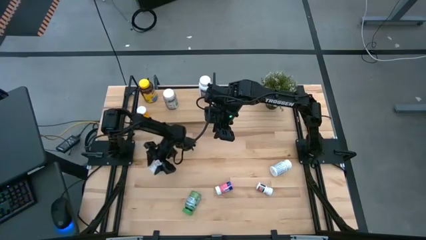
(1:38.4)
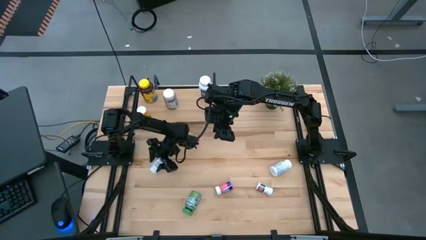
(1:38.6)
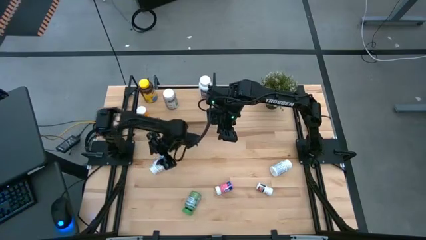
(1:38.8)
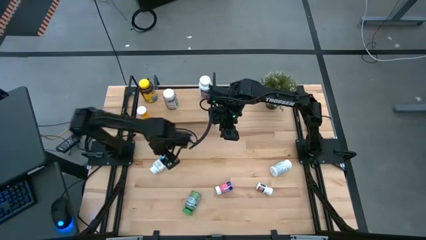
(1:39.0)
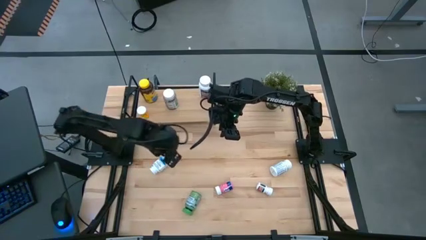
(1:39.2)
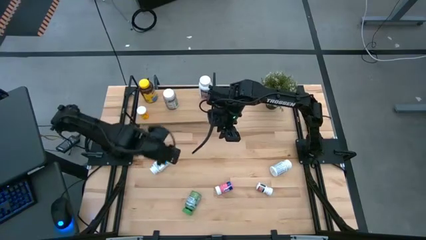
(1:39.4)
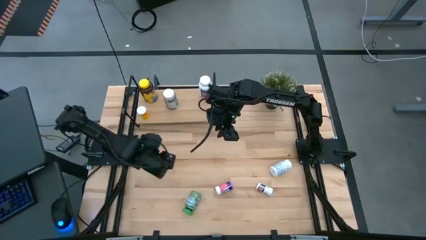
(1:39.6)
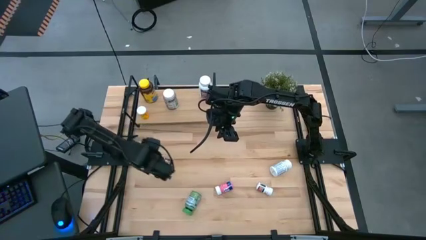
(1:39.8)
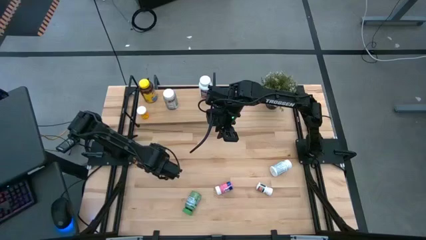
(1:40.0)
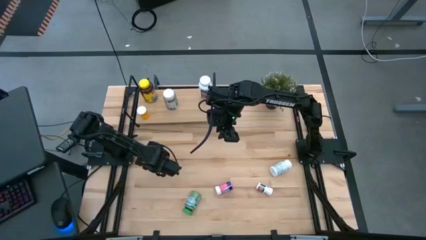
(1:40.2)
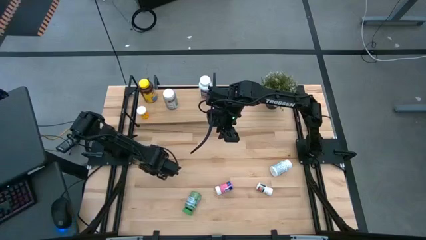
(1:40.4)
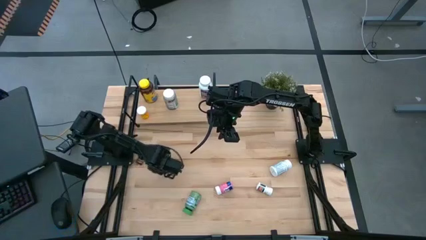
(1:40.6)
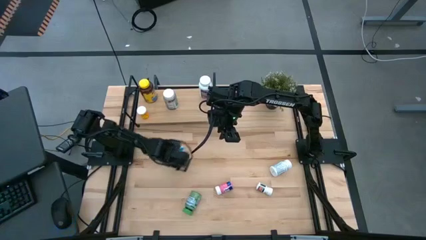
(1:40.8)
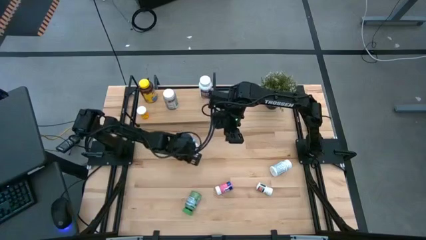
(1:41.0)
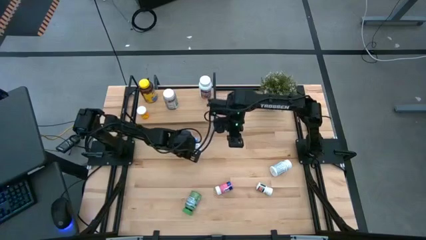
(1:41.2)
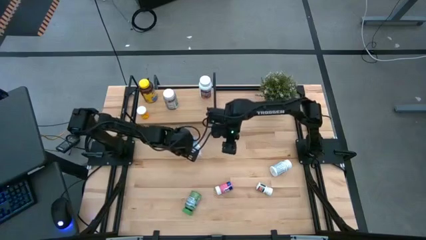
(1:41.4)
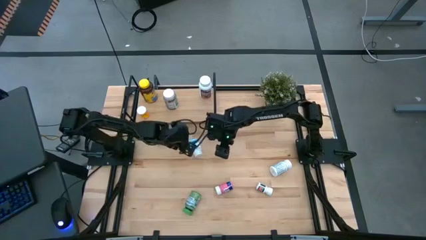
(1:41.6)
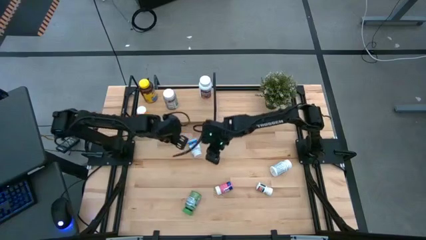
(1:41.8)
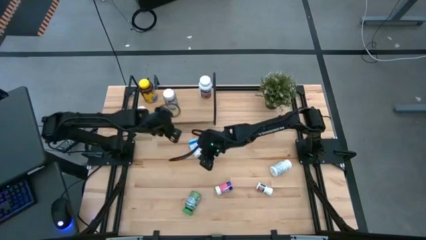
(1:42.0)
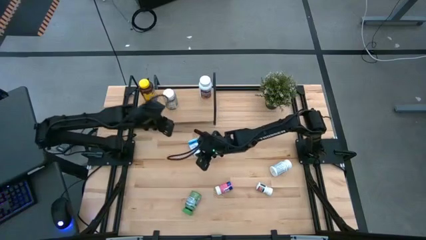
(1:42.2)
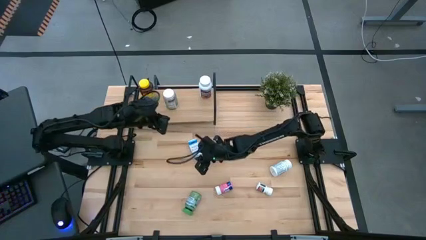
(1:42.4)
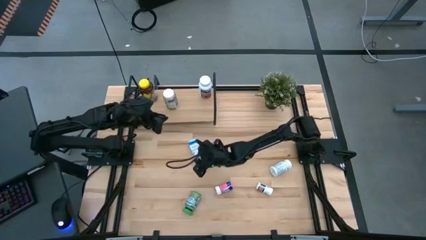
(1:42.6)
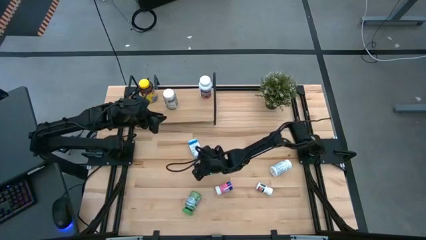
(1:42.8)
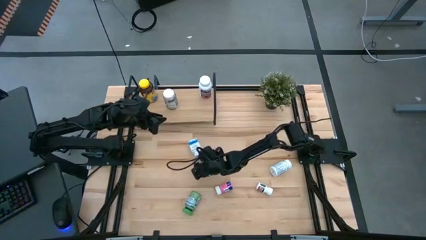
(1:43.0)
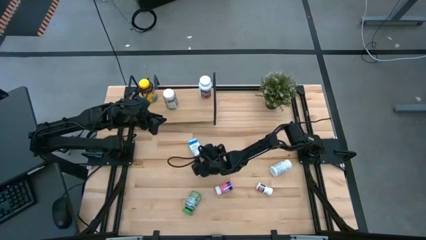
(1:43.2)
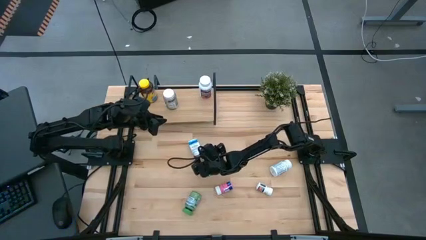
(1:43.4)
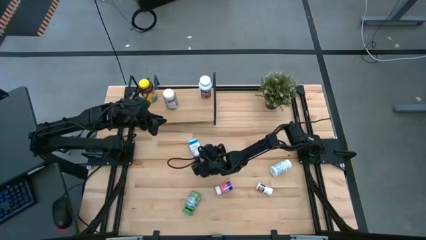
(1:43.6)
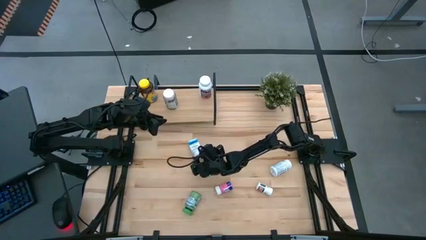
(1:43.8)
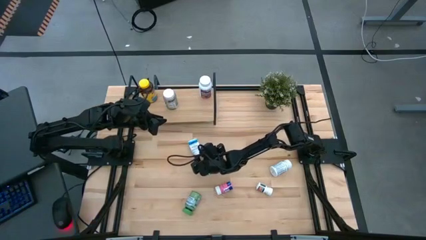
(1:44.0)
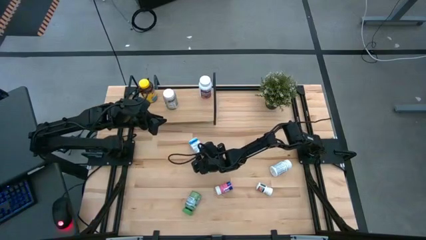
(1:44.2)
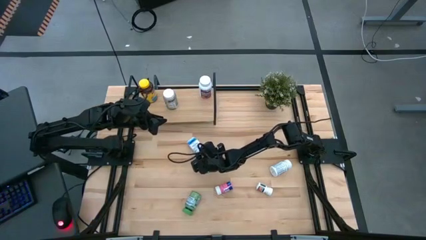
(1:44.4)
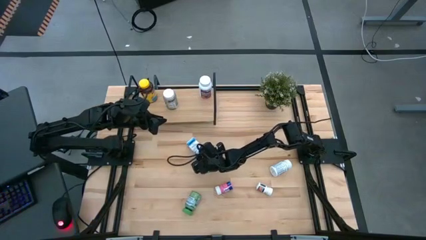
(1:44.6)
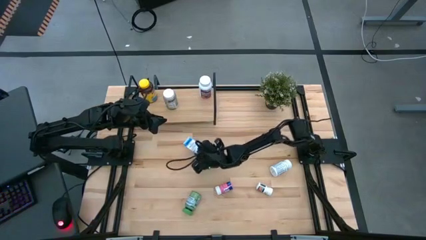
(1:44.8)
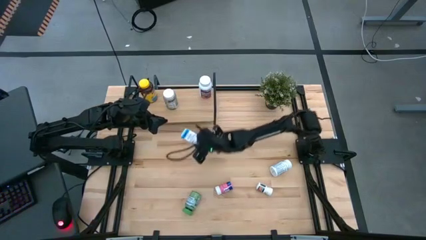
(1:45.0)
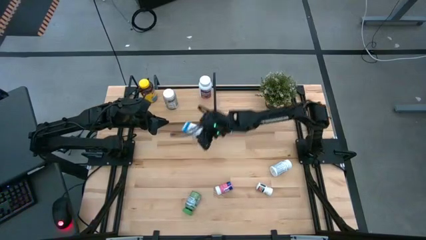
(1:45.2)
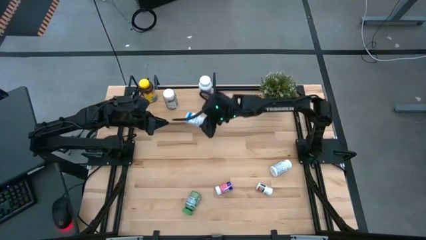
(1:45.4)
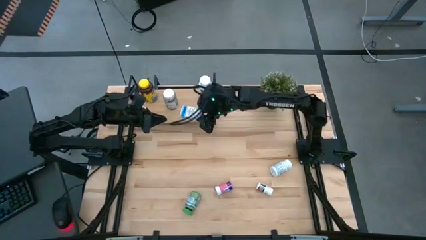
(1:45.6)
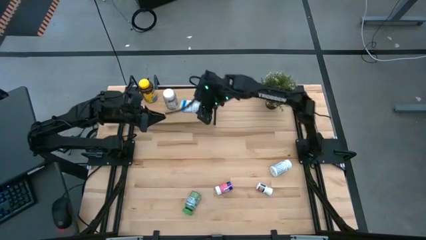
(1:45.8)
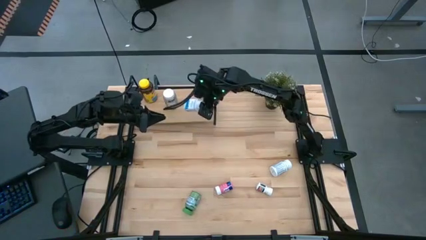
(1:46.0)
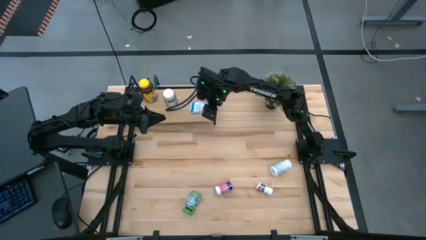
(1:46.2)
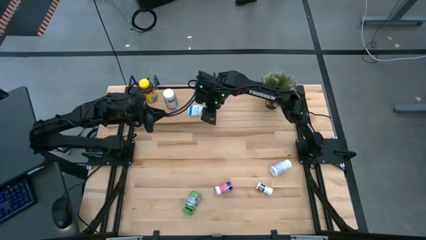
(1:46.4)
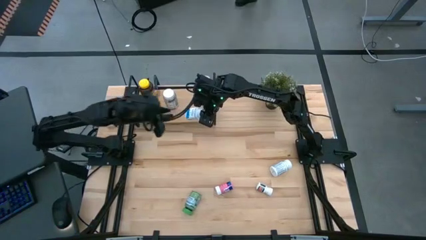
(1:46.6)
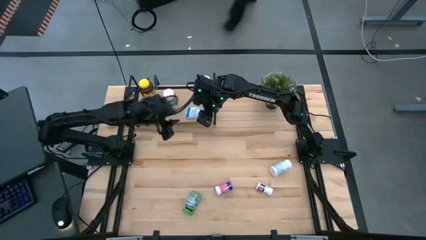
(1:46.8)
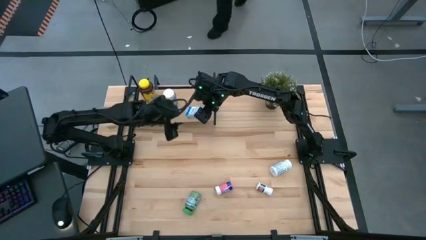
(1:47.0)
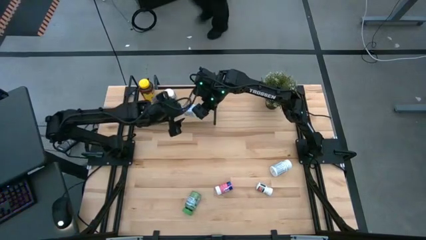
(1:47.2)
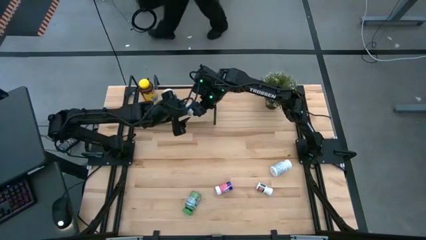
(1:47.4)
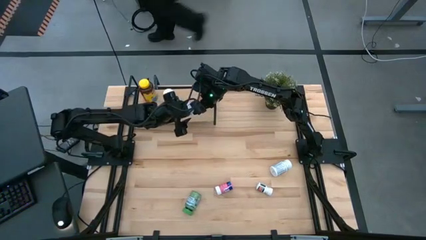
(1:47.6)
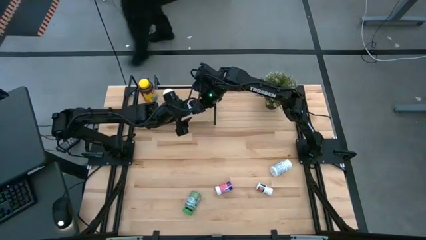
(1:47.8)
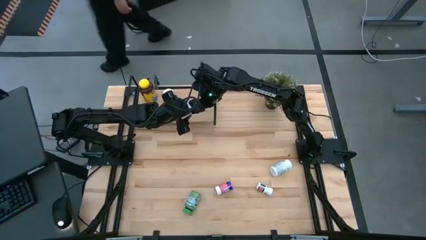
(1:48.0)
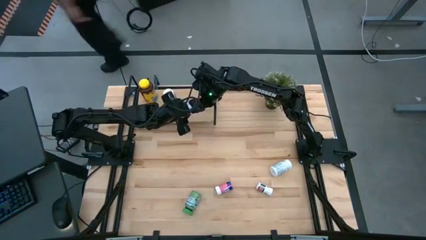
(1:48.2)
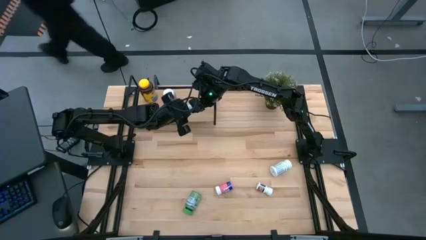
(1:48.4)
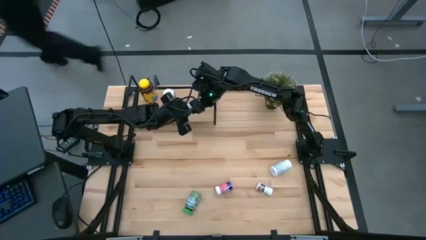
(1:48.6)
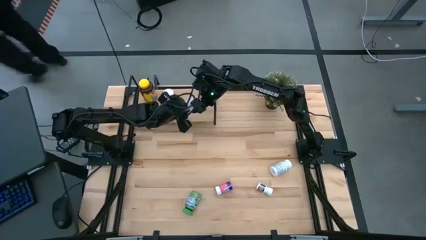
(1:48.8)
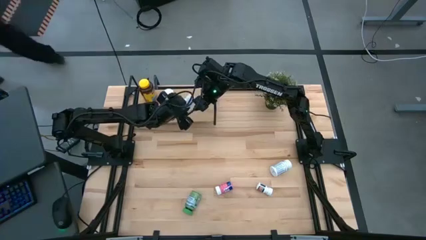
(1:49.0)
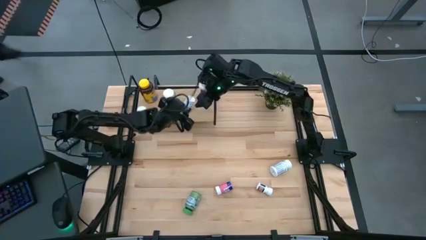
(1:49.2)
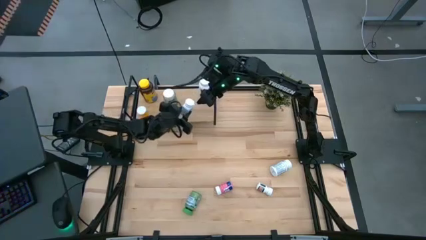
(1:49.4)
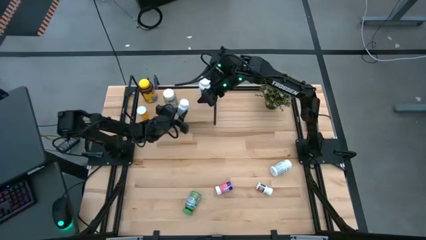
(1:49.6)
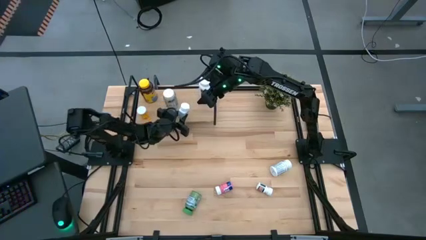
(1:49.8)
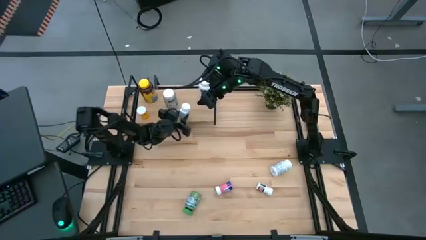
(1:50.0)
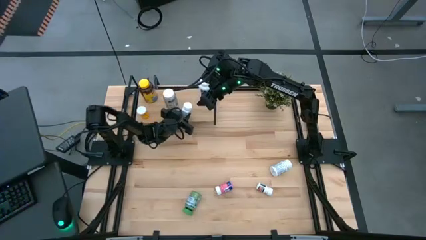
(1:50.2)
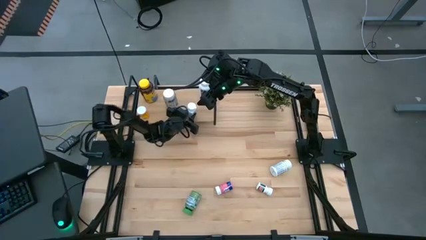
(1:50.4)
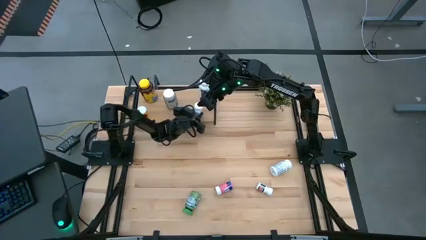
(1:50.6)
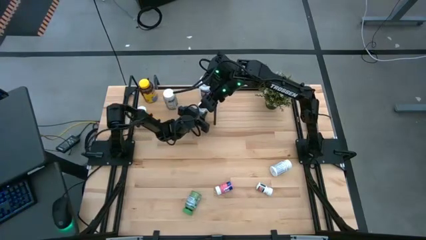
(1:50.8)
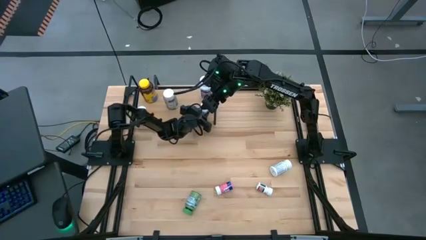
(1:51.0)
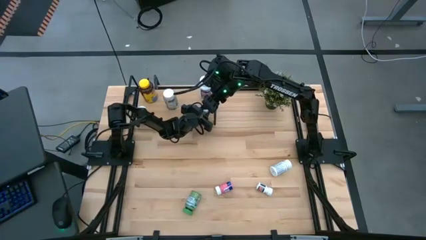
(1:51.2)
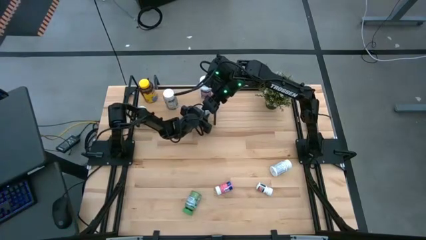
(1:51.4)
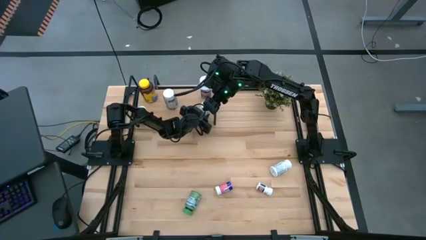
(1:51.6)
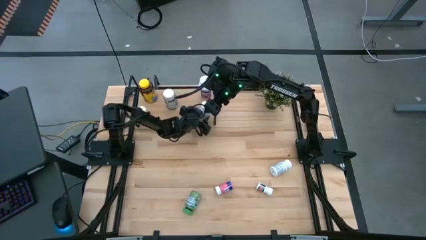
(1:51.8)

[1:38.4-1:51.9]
Task: Pick and place medicine bottles onto shelf by color
Put the blue medicine bottle on the shelf
